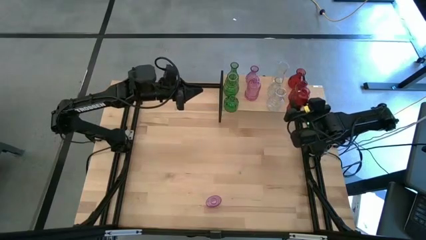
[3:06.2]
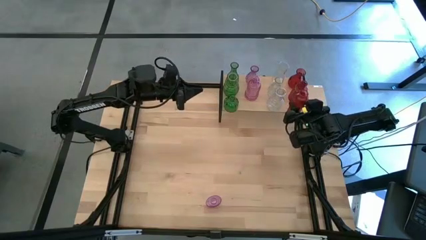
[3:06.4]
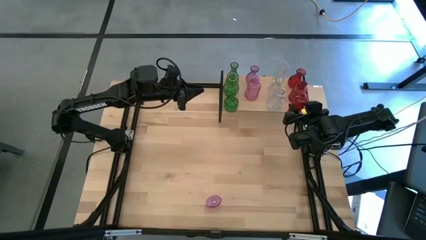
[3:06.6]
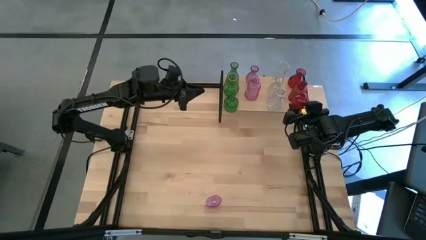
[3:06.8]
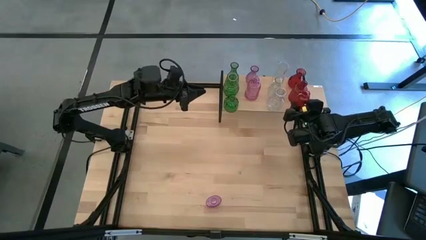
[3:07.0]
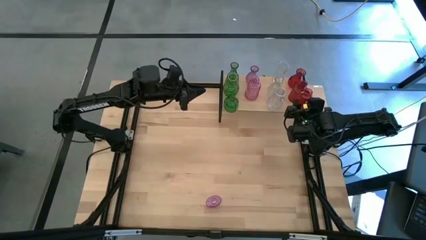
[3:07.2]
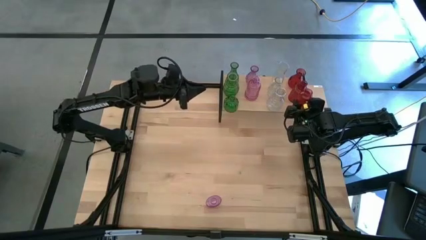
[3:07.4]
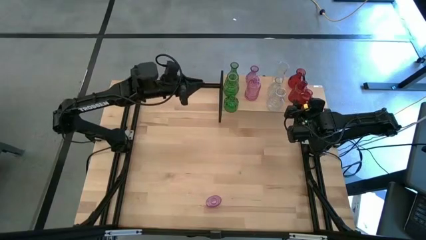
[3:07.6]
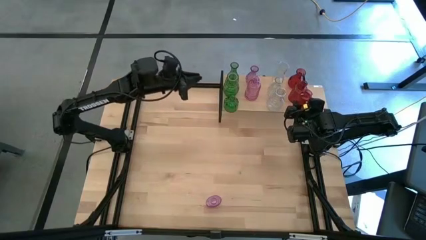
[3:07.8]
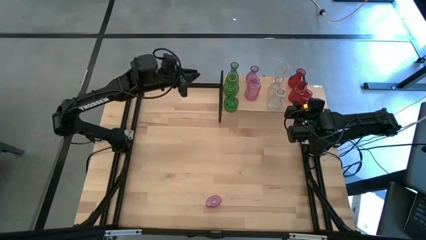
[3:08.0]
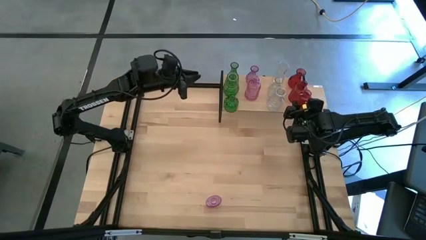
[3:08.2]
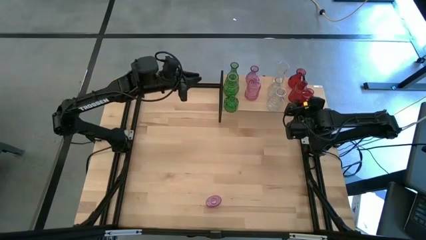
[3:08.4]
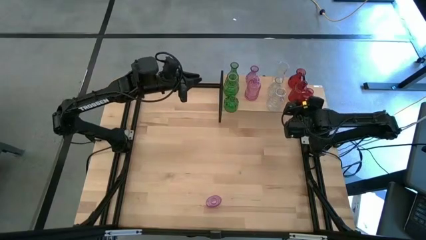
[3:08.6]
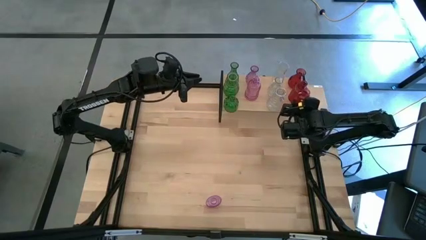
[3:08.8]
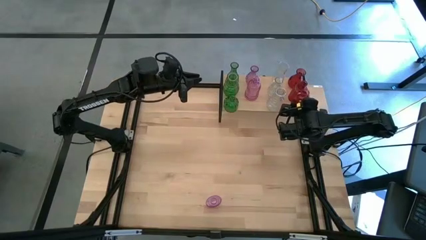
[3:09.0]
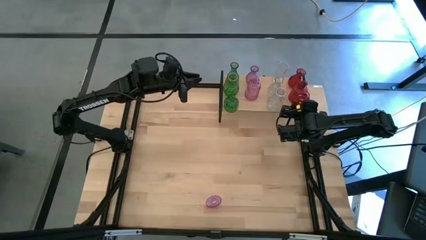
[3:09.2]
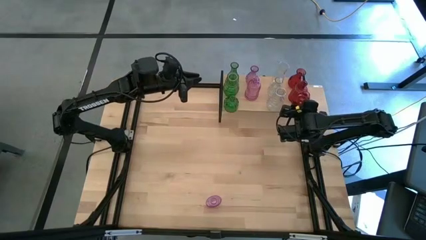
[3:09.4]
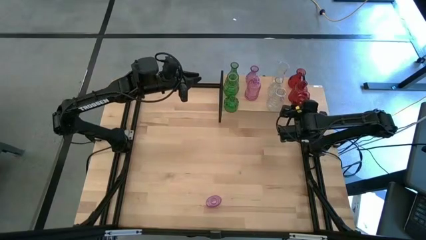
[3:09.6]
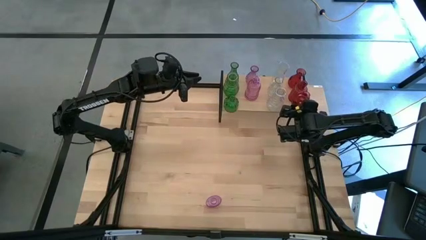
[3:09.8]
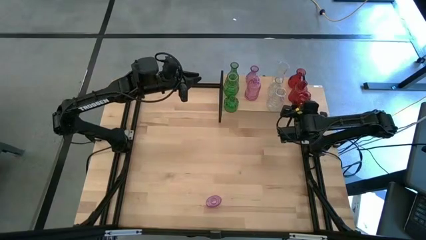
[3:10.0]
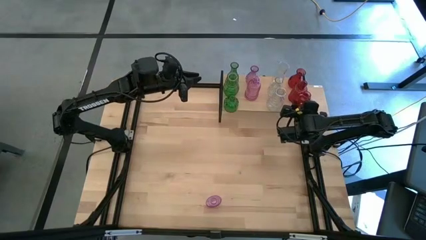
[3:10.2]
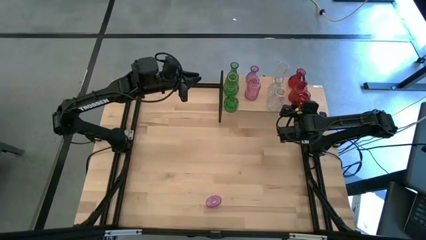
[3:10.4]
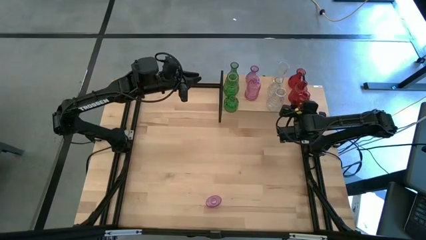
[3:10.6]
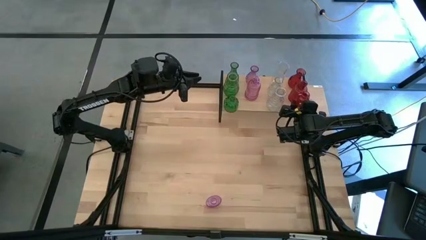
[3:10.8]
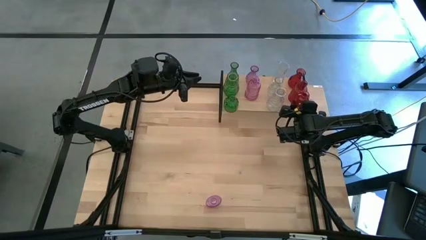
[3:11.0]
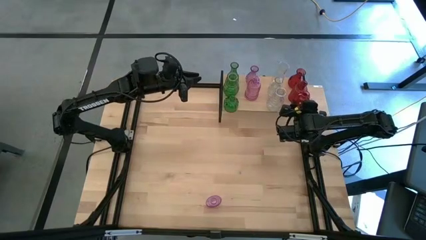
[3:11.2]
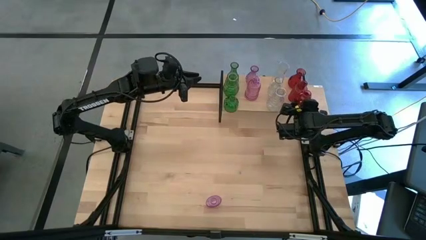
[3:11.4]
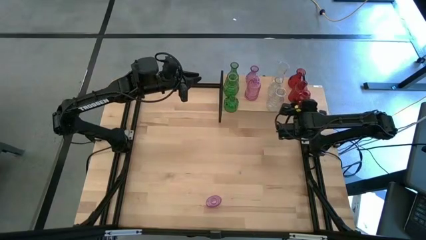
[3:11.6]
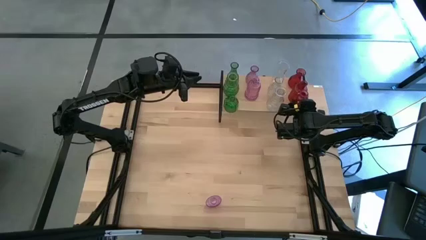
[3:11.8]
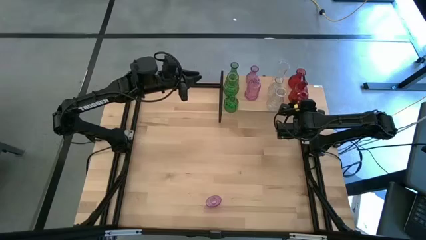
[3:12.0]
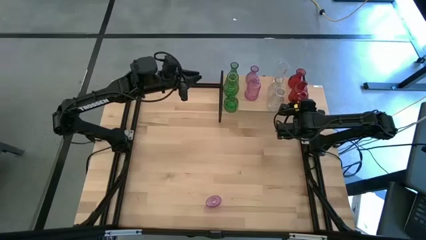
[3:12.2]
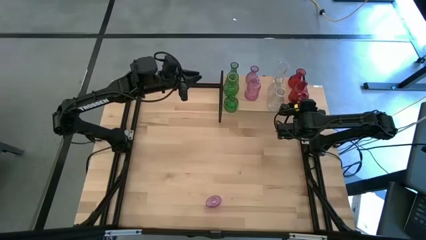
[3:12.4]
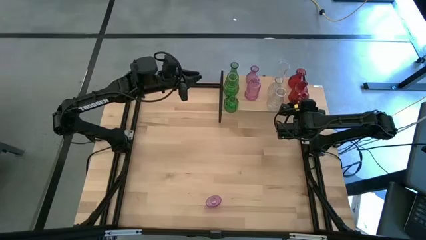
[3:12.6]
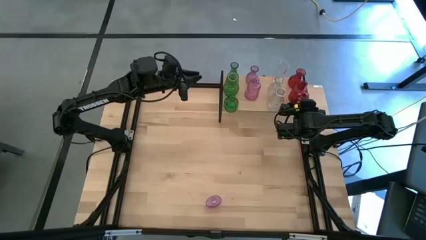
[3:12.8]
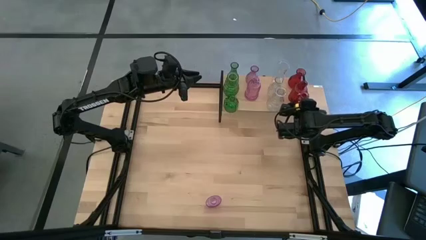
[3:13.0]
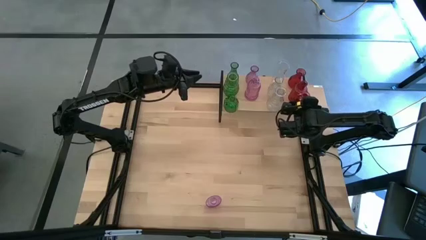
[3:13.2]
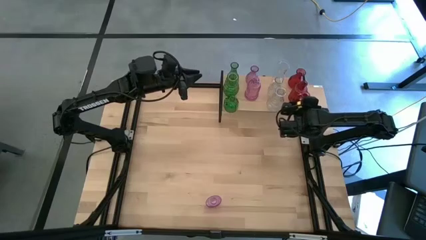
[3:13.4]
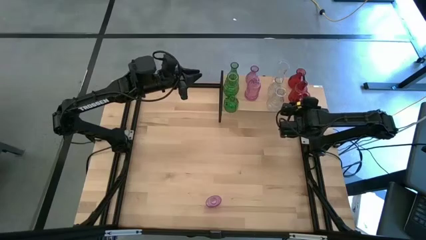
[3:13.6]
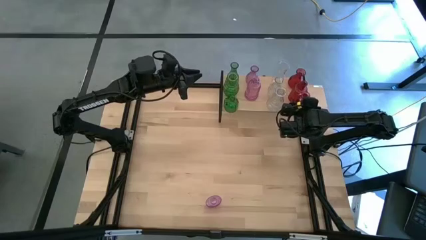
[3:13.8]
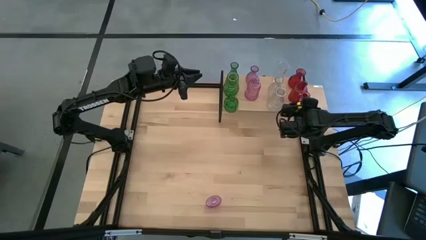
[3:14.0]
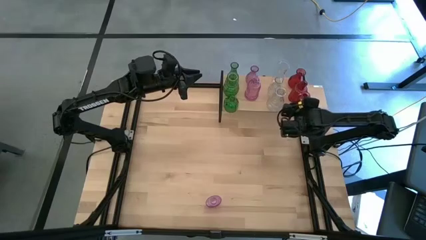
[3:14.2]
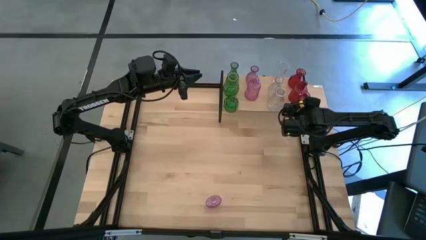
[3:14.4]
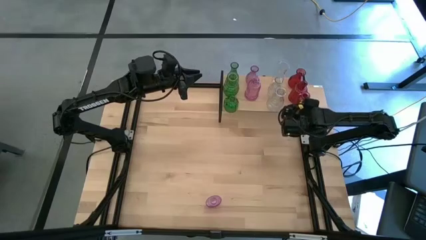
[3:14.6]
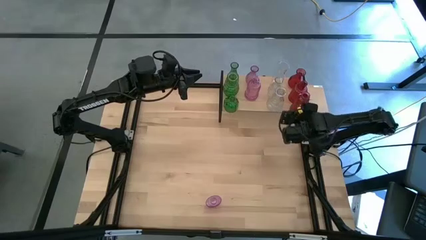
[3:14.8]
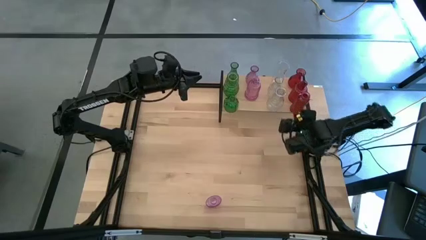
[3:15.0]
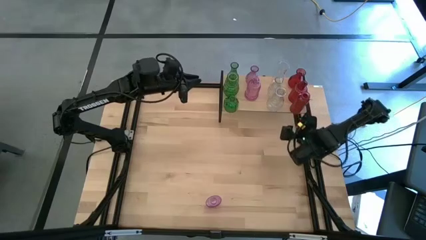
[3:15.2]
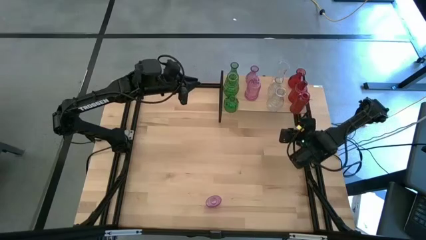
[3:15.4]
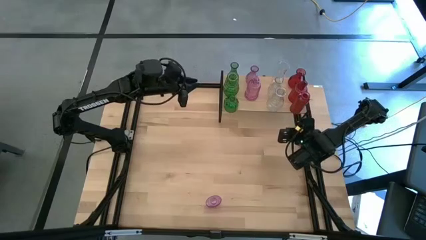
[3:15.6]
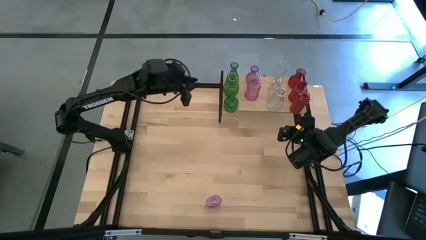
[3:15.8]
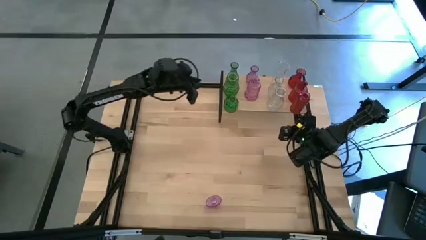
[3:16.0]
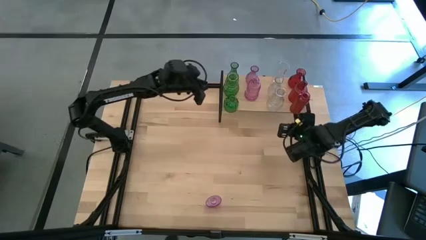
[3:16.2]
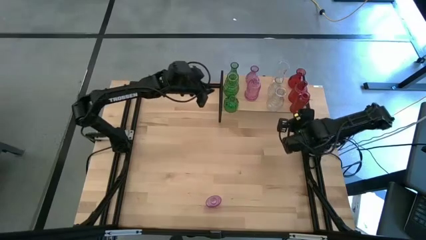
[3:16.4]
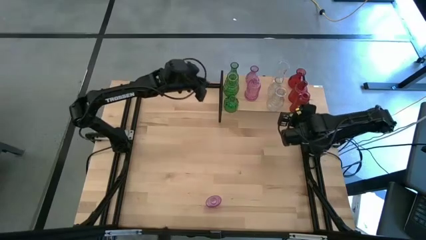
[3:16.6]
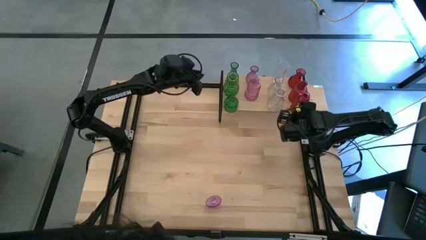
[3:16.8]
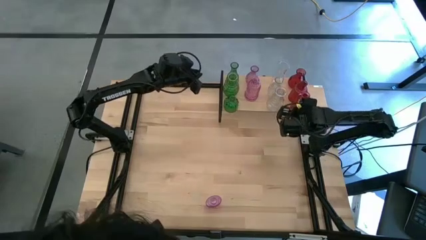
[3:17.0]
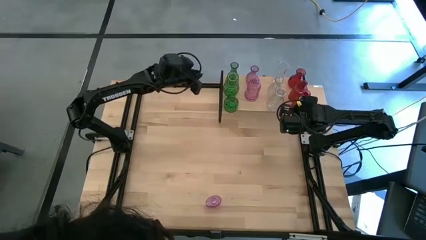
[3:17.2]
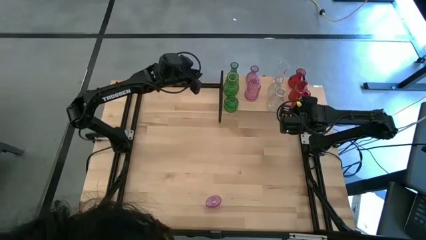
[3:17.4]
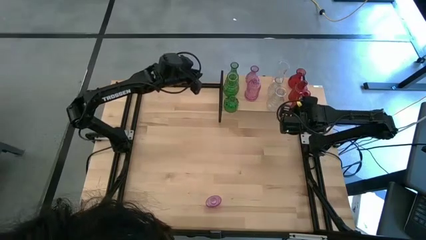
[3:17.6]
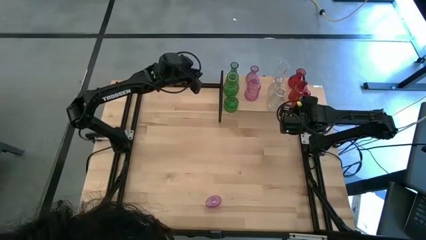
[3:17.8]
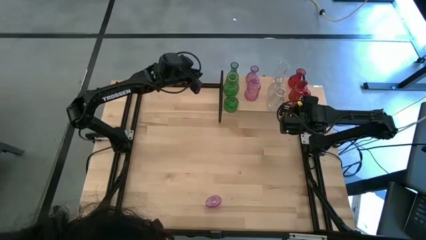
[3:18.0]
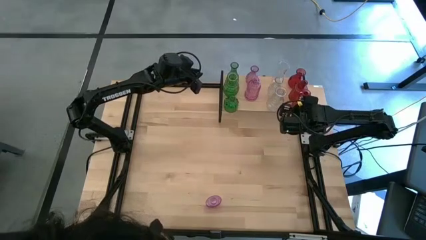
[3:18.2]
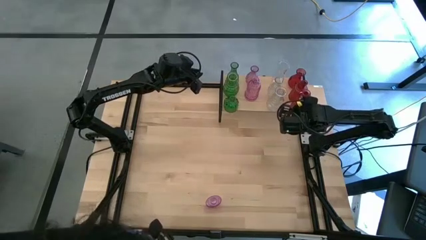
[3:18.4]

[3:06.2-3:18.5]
Task: sort vases onto shelf
Put the red vase on the shelf aligned with the other red vases

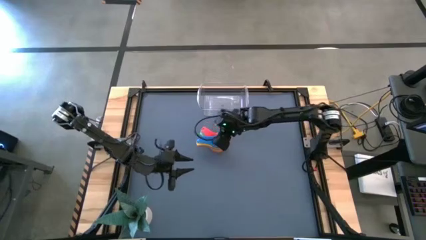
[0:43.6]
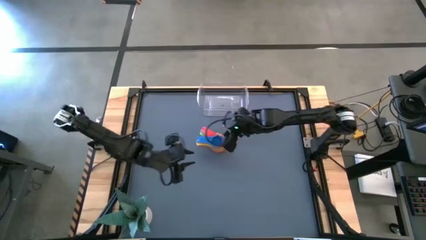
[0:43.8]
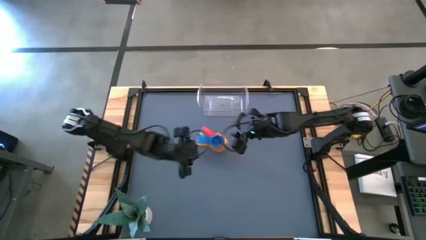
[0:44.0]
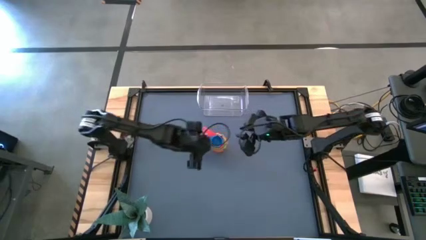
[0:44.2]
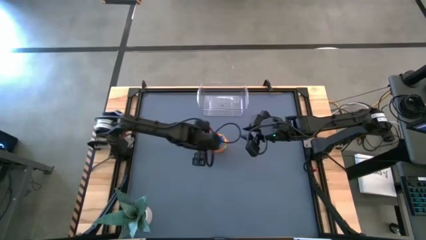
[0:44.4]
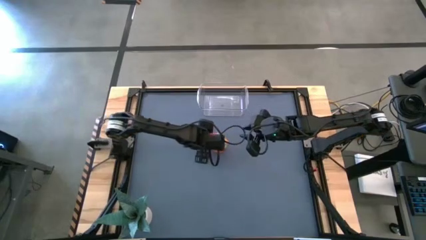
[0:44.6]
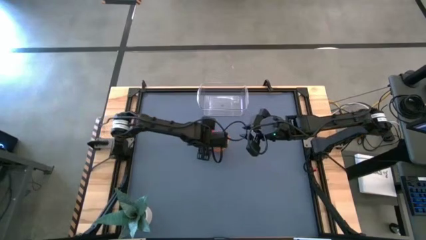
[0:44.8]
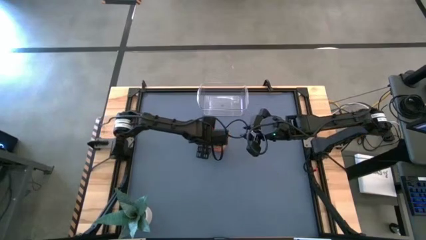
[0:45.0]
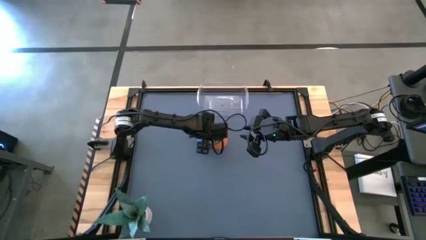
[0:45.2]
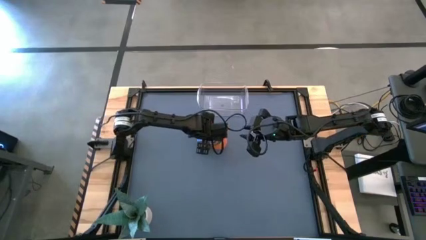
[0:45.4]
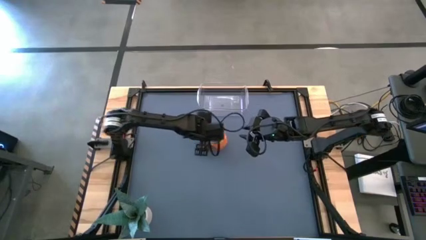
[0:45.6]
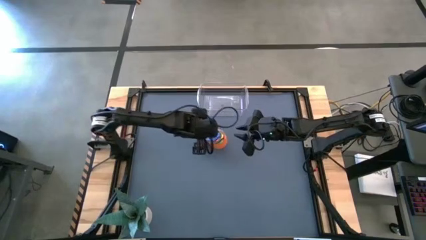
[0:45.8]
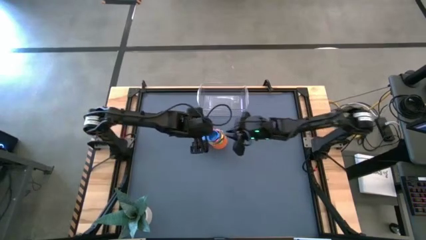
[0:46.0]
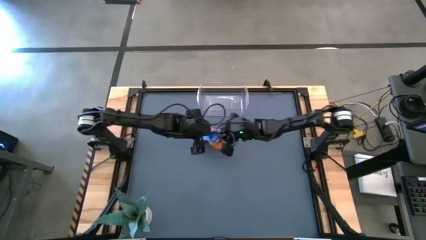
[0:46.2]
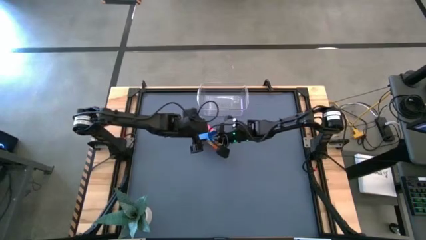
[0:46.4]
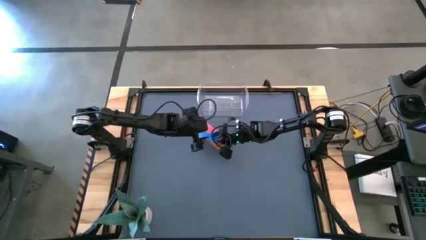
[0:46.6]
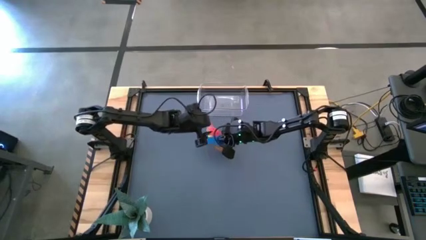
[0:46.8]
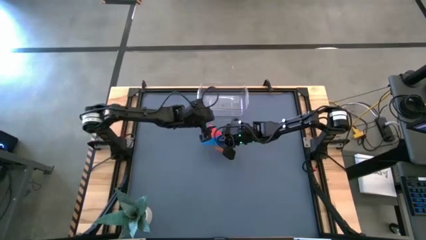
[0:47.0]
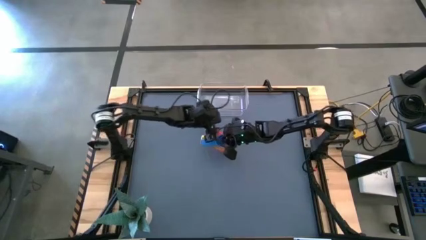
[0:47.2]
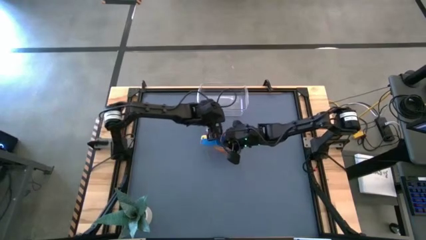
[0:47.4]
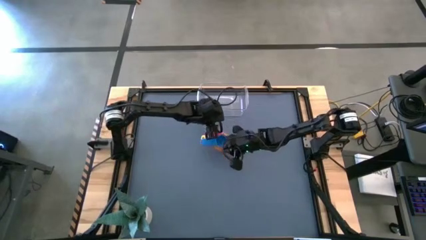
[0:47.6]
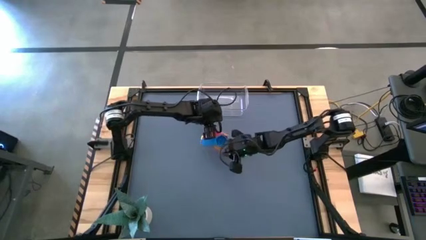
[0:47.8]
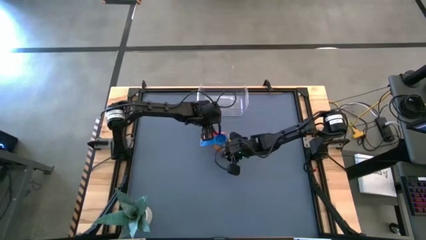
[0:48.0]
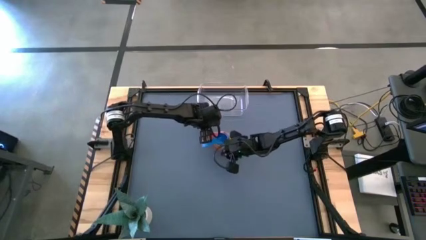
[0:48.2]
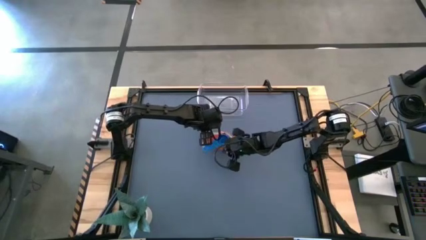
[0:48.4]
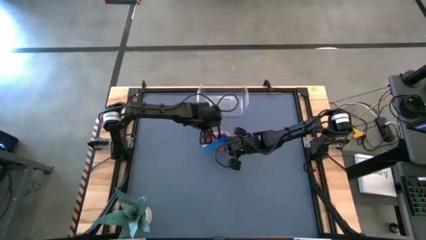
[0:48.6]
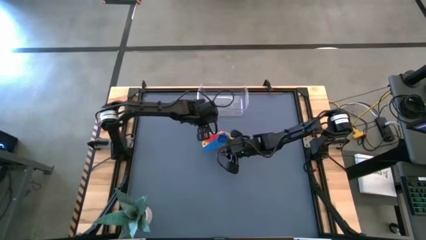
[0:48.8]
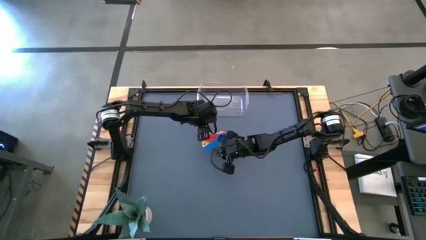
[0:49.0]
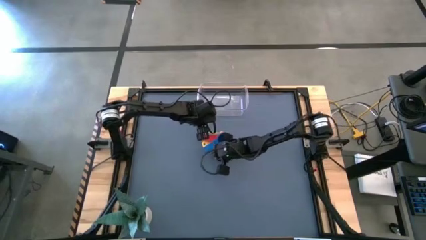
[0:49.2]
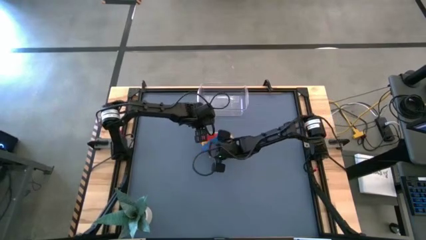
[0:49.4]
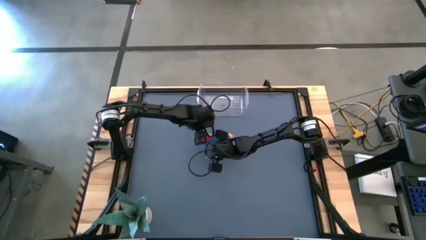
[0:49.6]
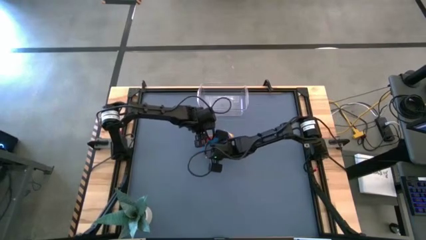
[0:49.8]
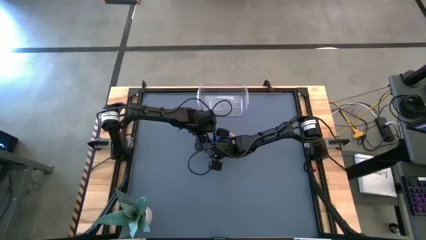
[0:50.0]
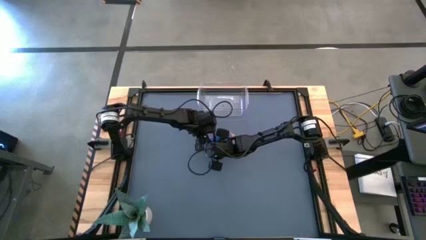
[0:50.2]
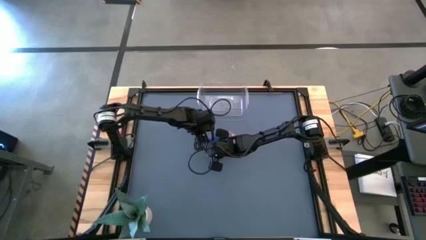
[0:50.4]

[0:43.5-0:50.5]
Task: Nest measuring cups in basket
Adjust the nested measuring cups
